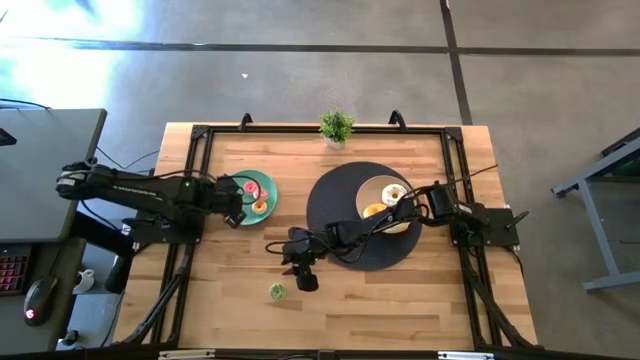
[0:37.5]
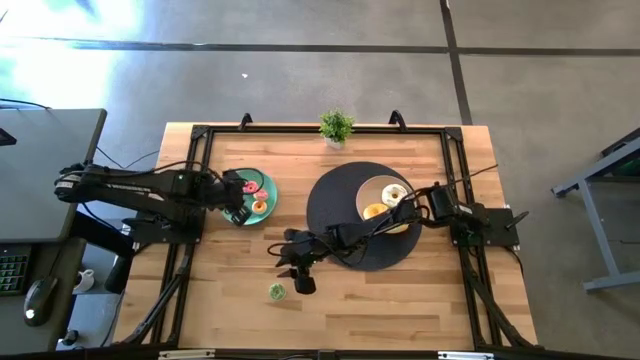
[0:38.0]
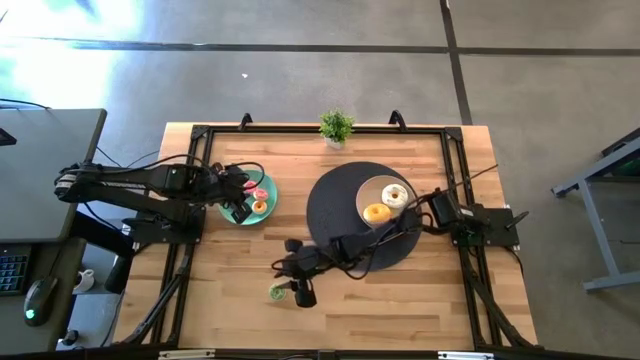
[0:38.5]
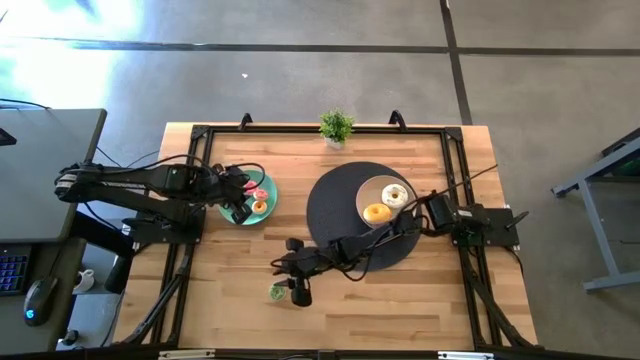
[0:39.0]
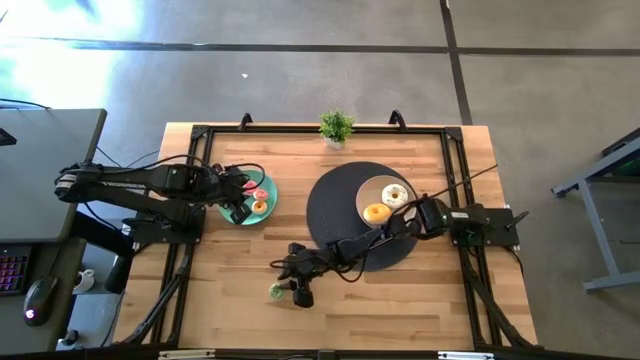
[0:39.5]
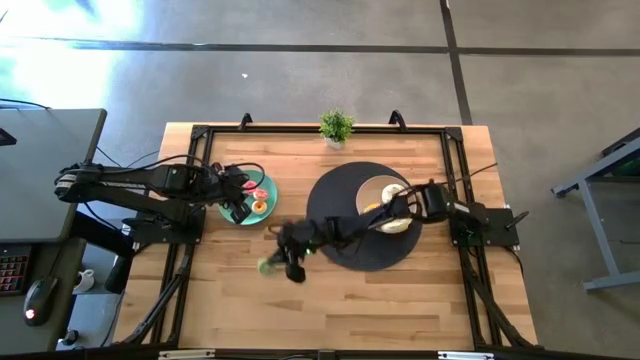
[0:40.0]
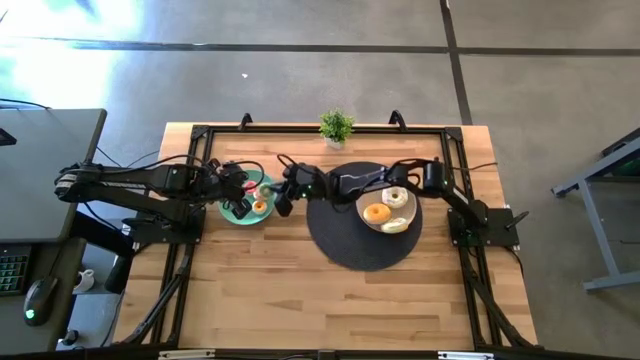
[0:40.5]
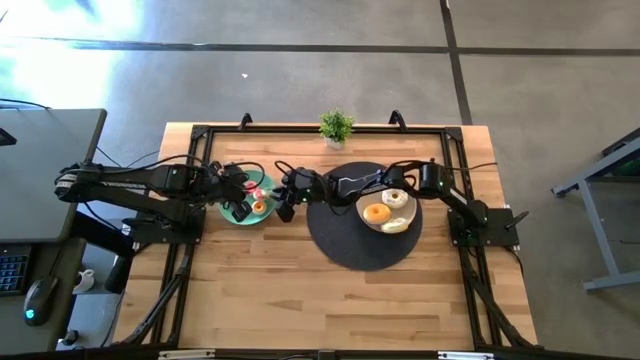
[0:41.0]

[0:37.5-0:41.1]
Task: Pick & Place donuts
Put the small green donut on the green plate

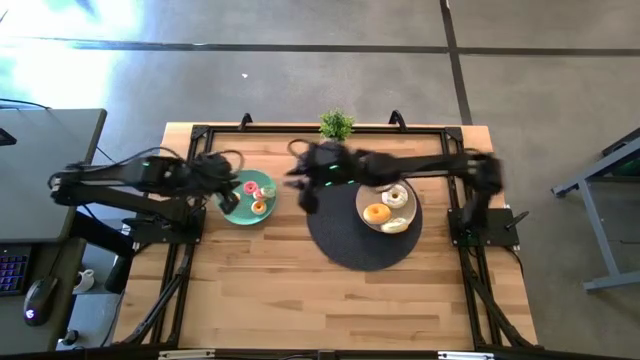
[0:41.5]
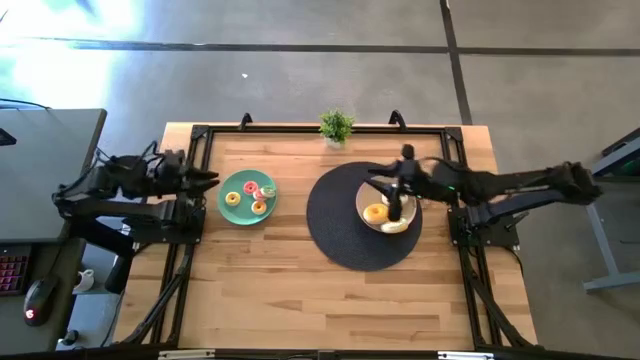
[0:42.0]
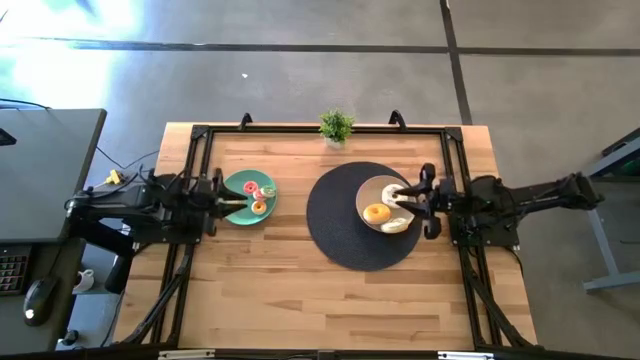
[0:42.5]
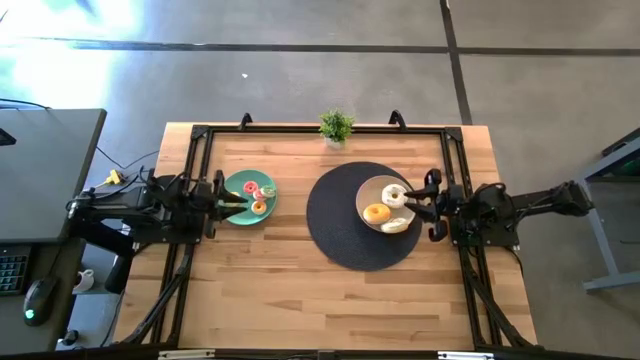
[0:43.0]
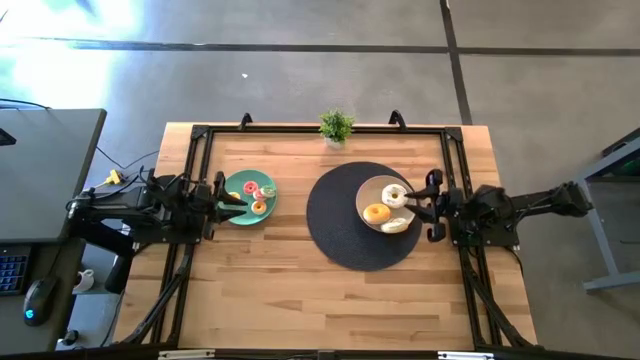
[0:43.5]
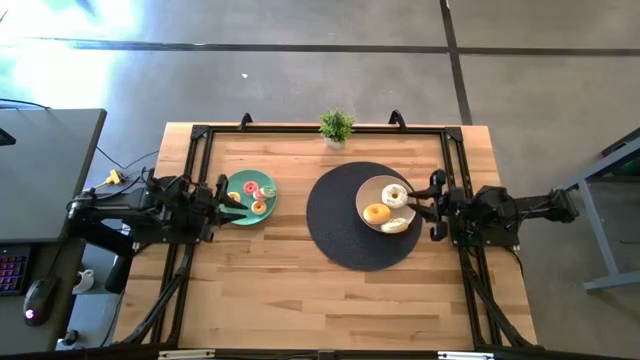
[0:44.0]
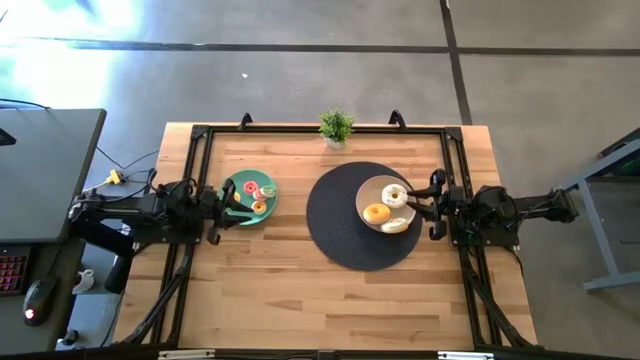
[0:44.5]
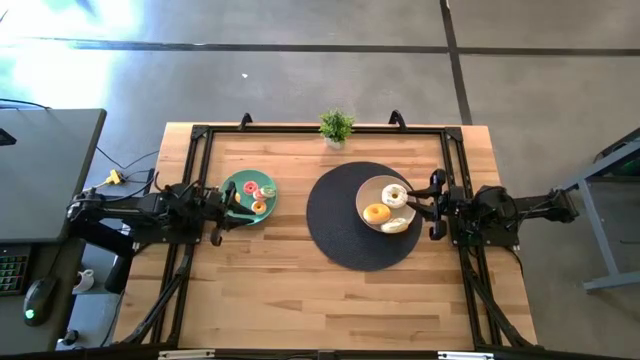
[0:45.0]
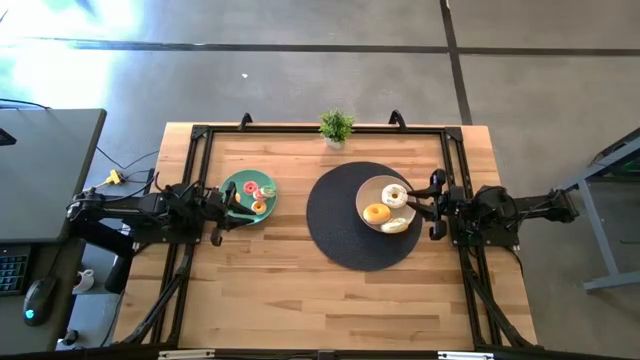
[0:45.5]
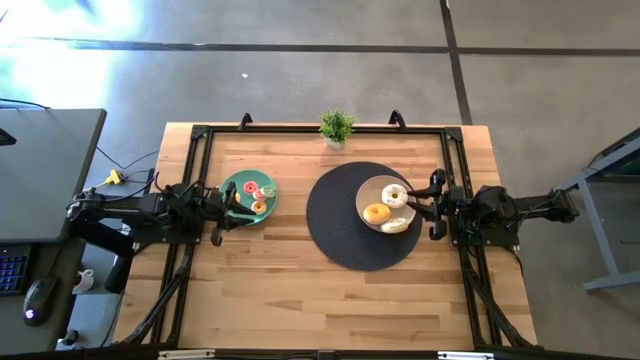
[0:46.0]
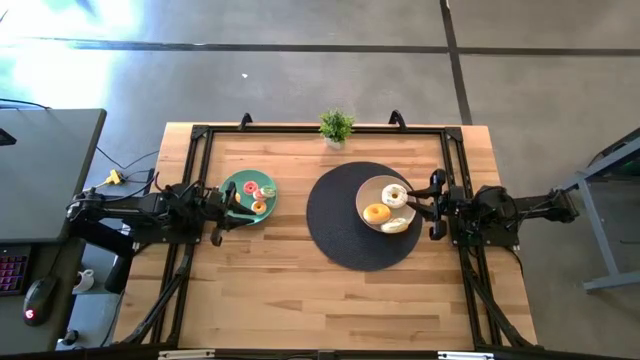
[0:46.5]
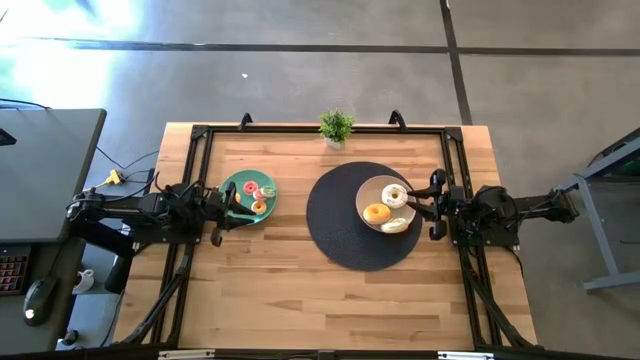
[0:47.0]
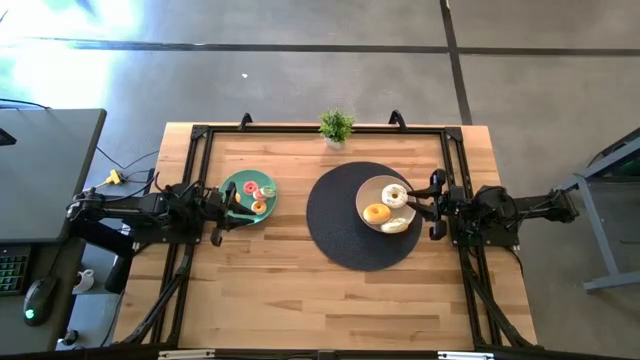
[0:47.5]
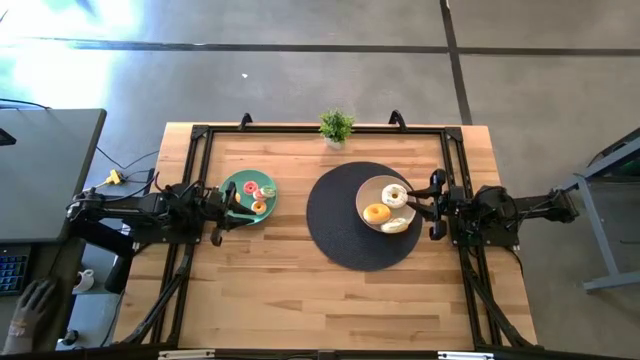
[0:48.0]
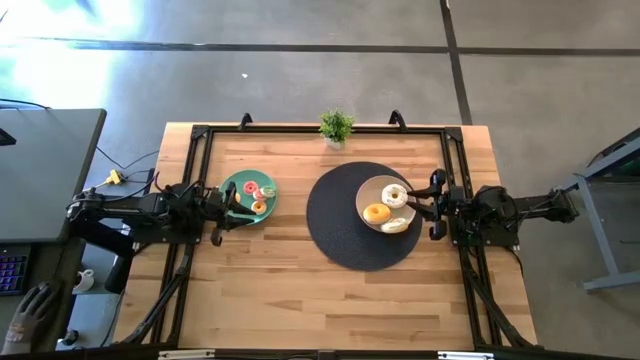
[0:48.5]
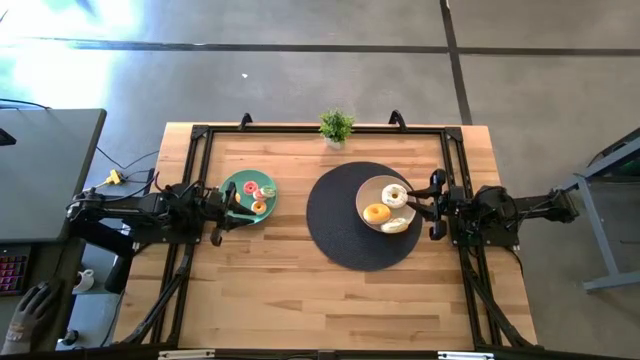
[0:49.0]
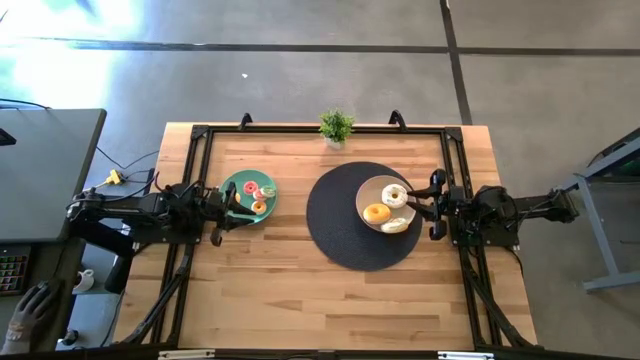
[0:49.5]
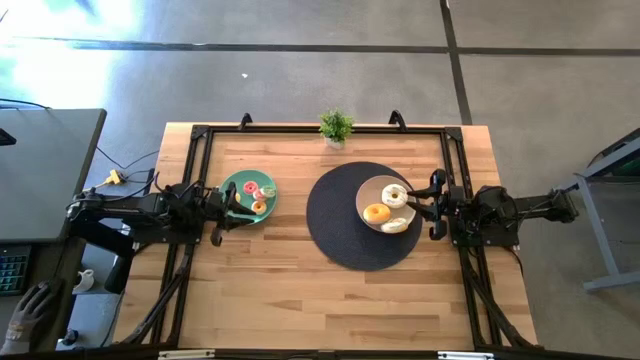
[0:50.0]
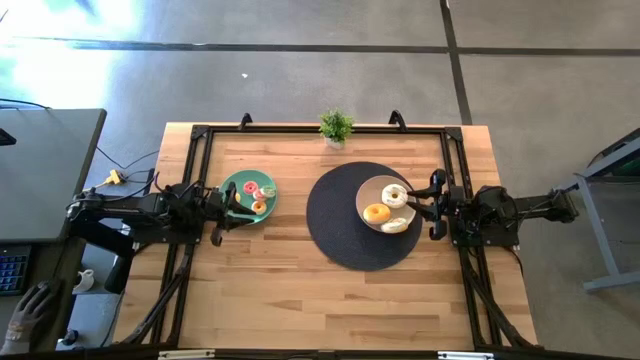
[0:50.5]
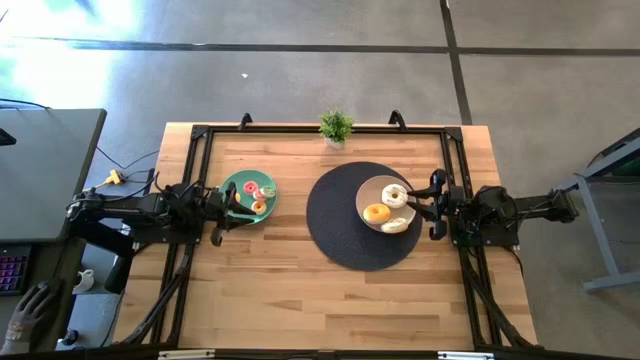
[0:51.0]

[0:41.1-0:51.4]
Return to Home Position

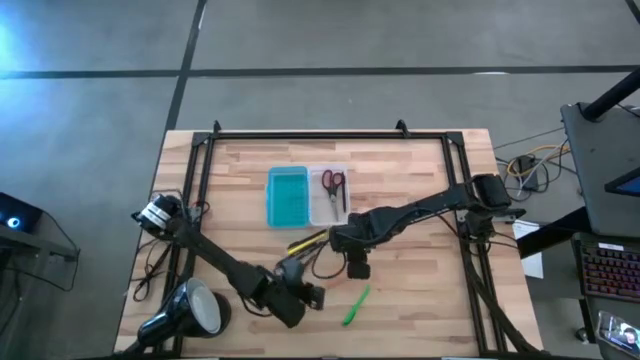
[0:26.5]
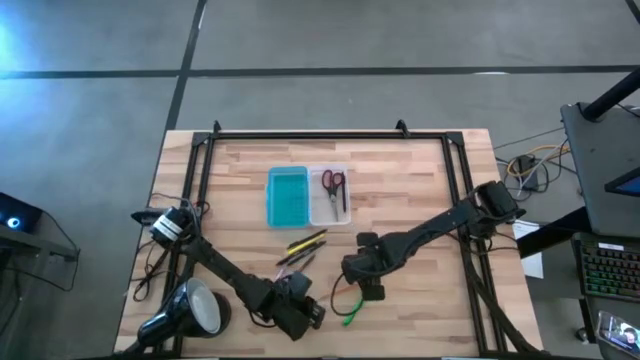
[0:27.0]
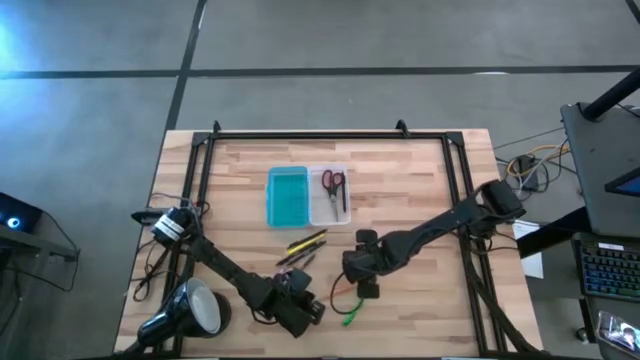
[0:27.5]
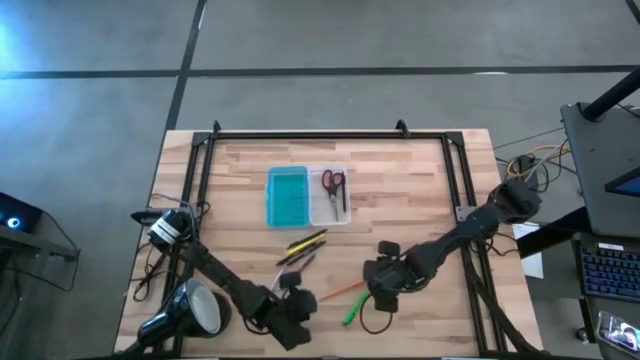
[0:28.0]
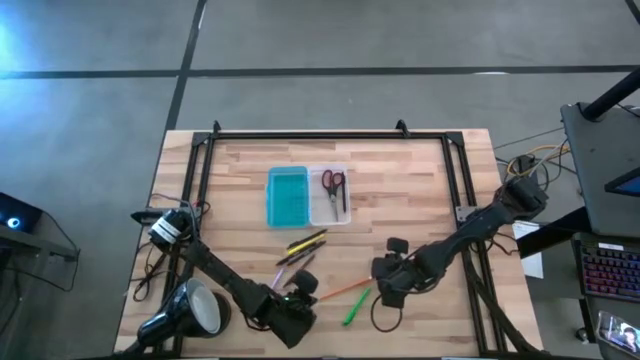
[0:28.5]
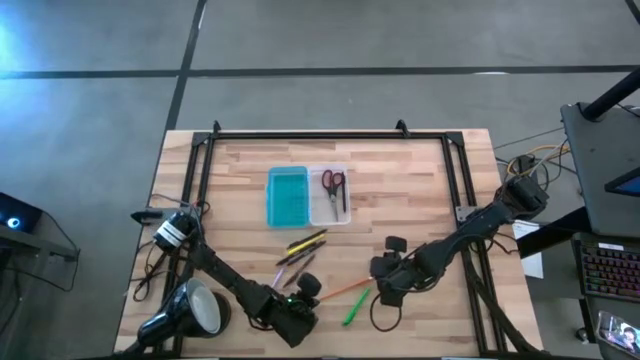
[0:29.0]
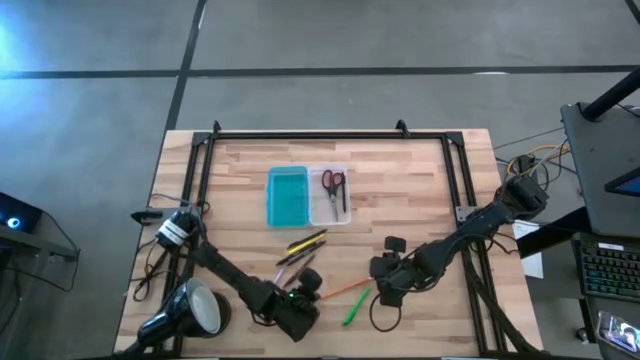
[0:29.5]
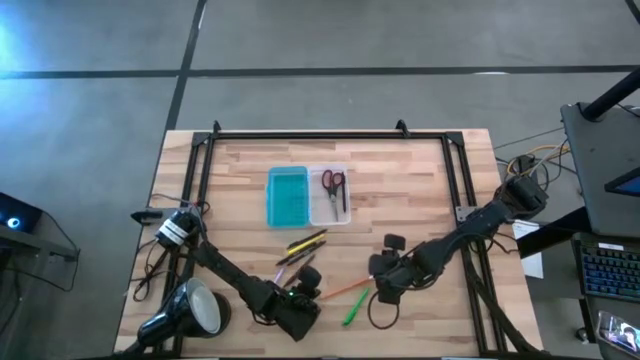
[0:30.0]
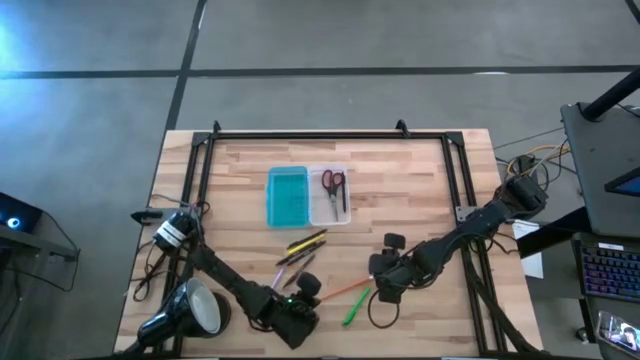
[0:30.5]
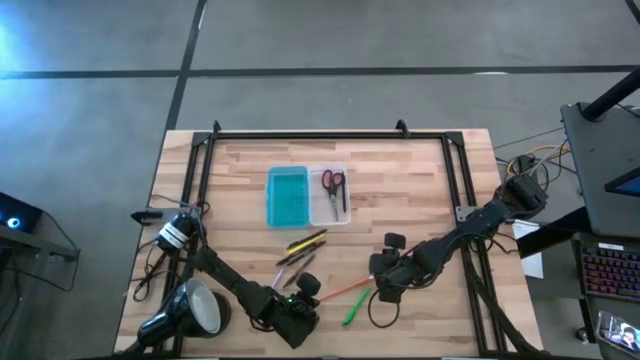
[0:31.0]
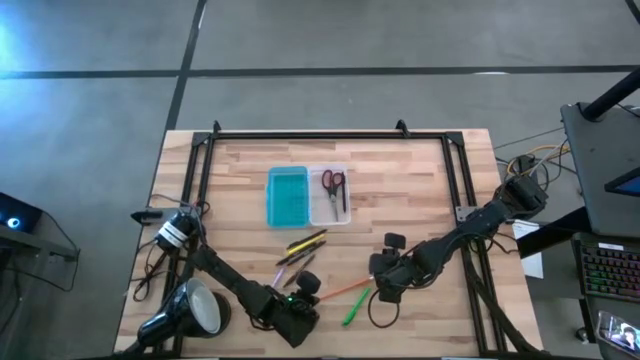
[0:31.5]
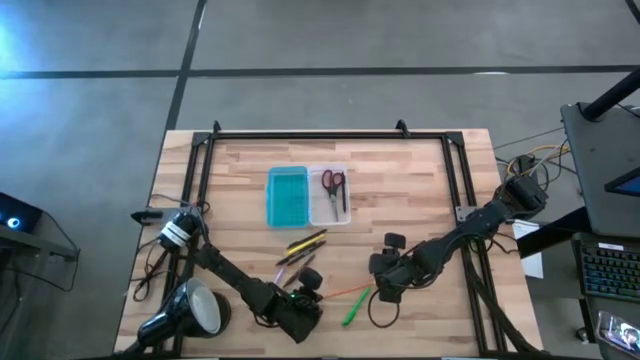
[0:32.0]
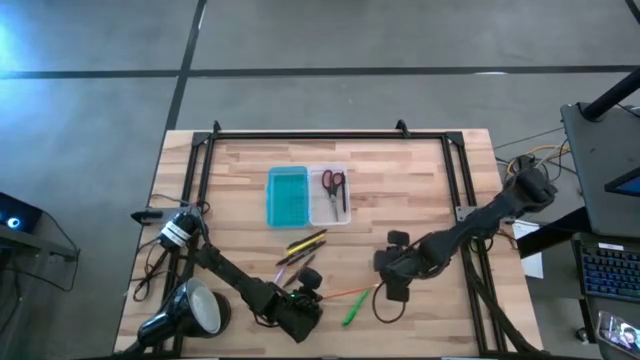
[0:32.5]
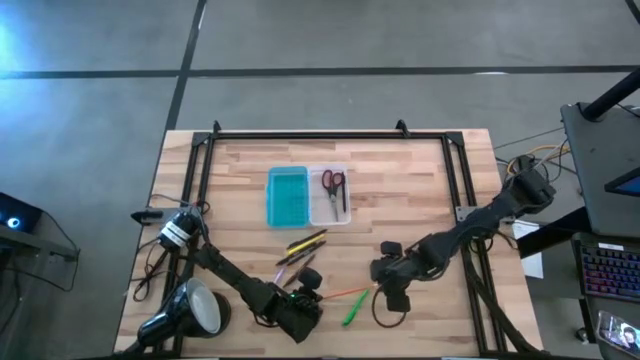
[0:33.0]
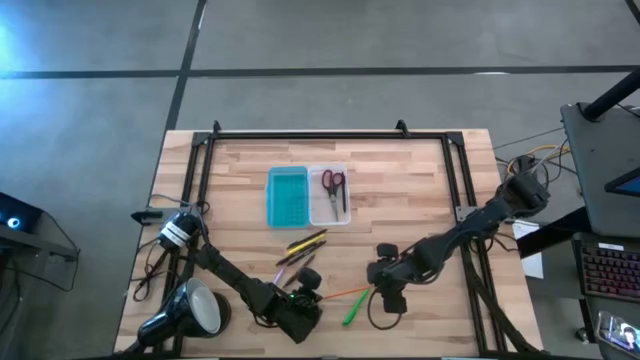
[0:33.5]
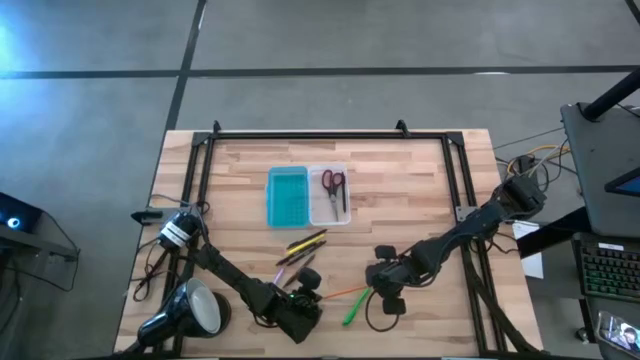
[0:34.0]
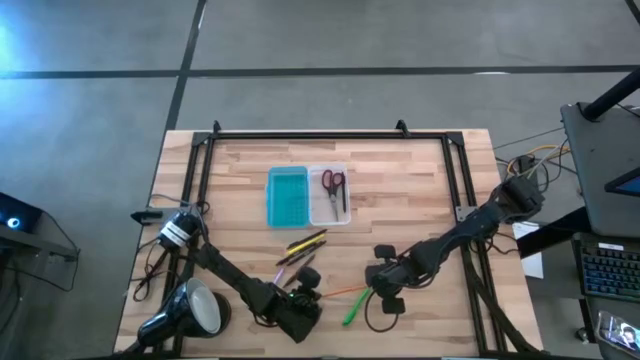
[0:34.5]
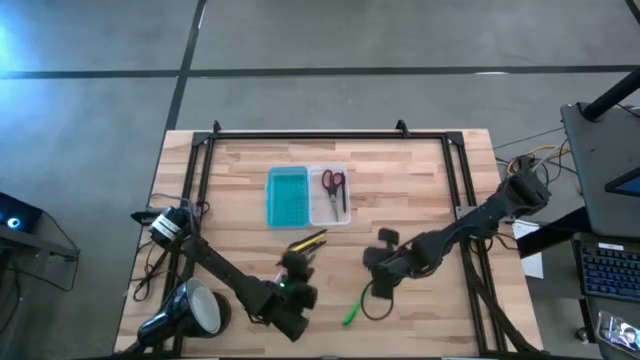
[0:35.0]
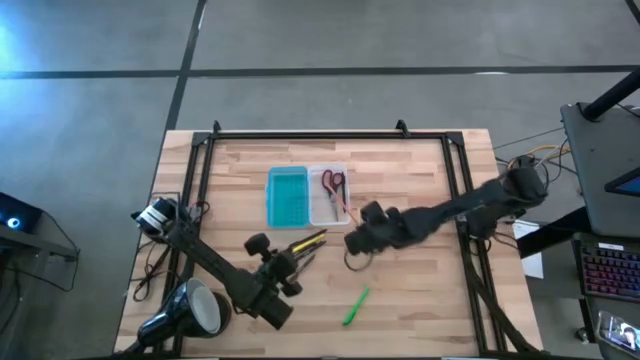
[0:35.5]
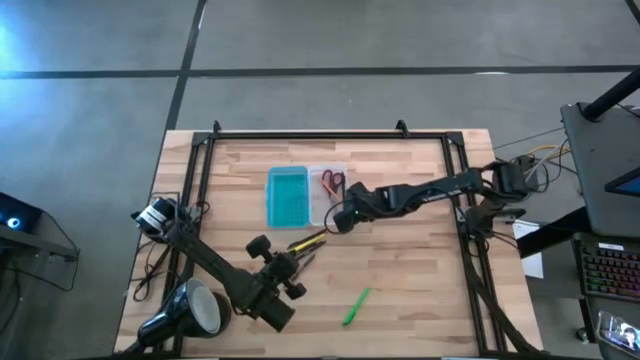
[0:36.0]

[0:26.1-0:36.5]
Task: Pick & place school supplies into a supply box
Put the orange pencil into the blue supply box
